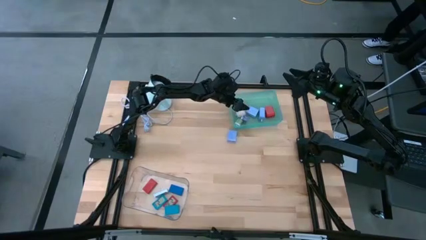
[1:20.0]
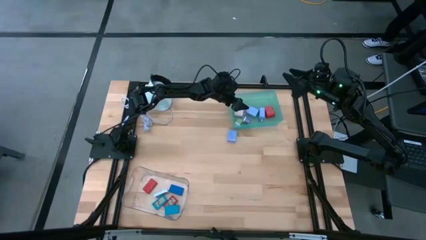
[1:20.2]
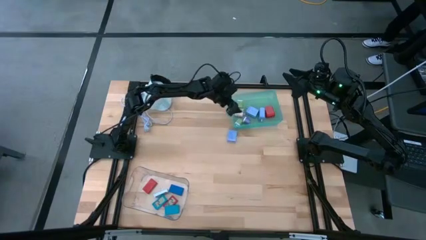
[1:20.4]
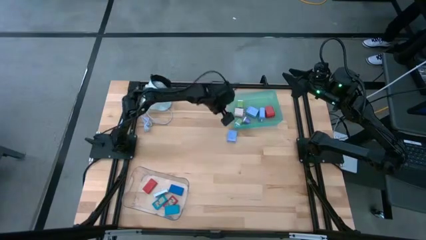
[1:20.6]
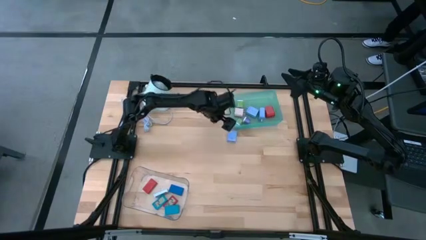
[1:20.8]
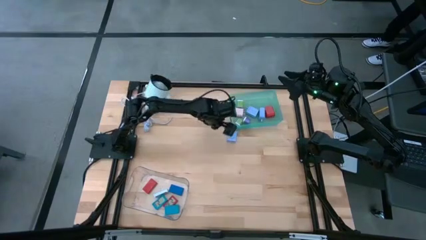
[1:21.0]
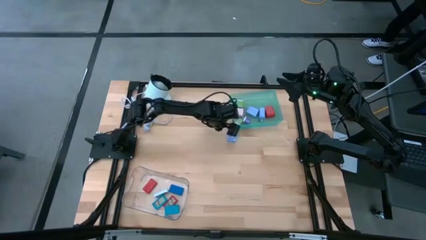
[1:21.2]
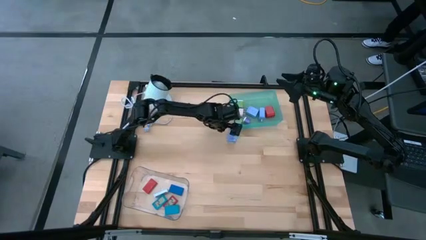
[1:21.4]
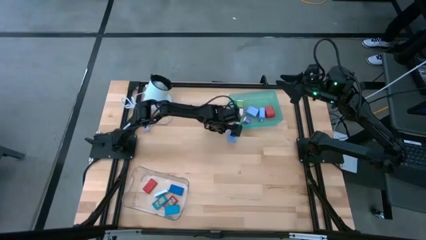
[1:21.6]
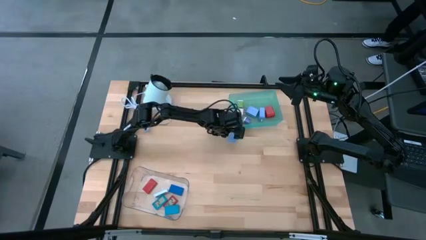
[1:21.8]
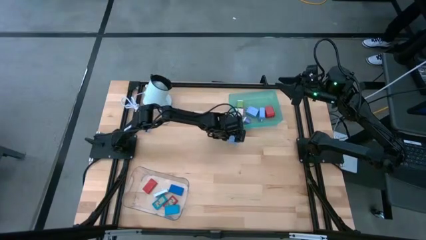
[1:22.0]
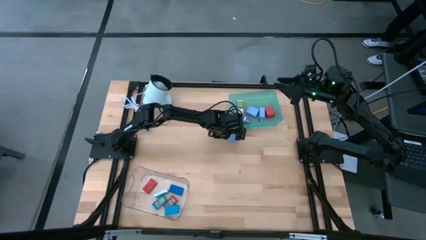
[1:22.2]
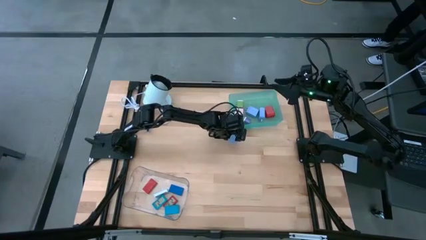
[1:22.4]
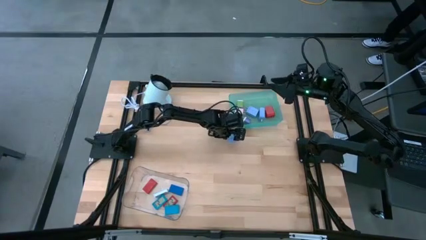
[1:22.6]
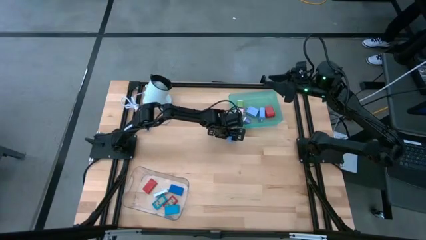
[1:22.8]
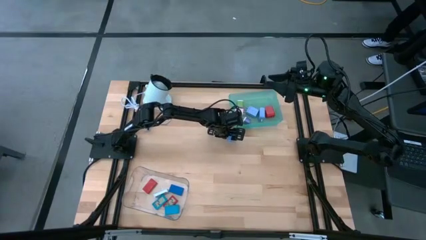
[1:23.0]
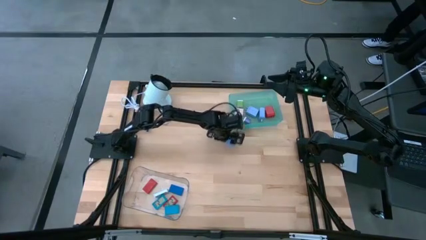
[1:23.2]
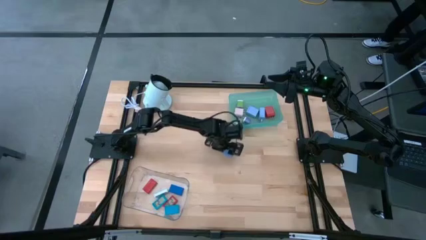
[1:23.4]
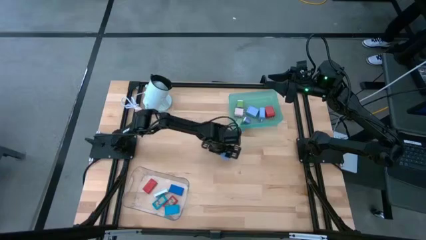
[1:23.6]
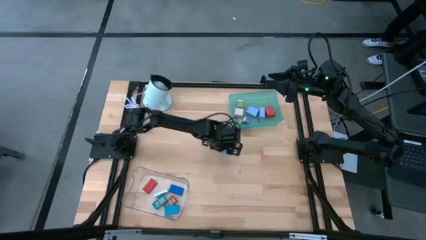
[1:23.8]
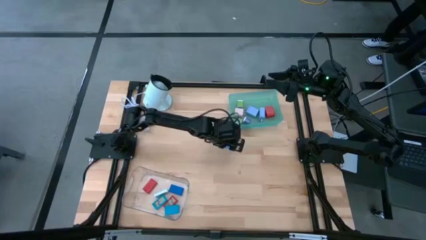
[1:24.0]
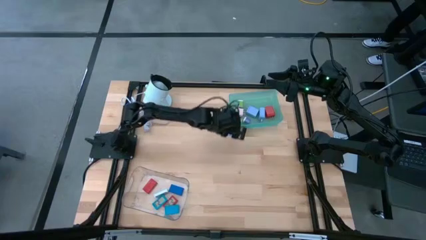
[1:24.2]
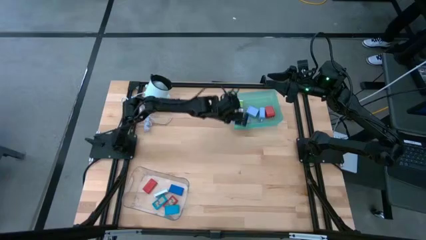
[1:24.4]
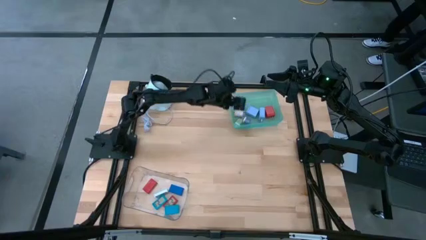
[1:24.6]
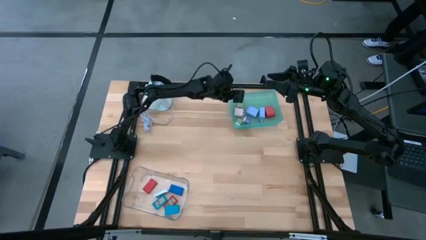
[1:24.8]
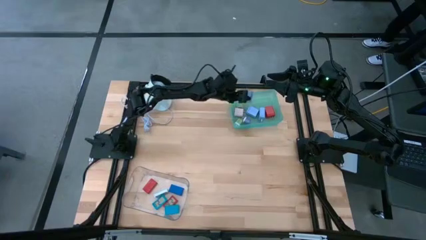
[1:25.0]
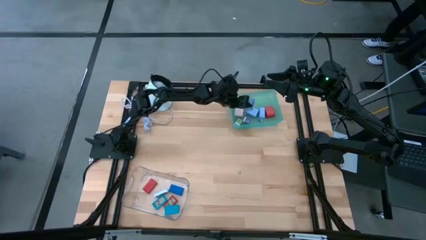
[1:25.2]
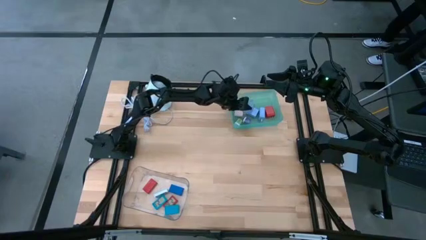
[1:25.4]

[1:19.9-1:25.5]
Task: Pick & Place Office items
Put the light blue charger adapter into the light green bin

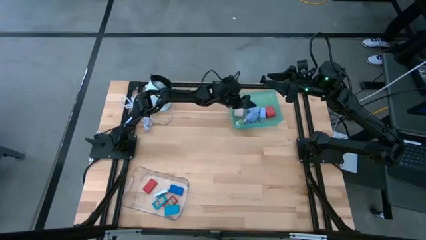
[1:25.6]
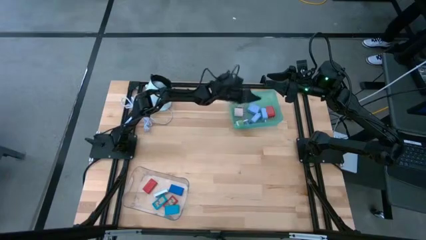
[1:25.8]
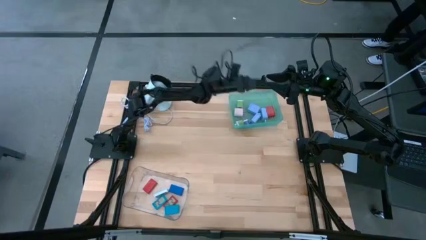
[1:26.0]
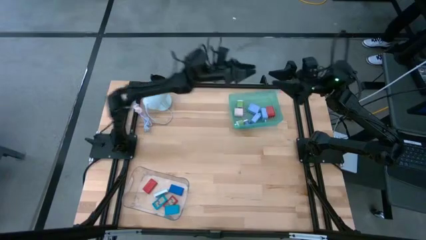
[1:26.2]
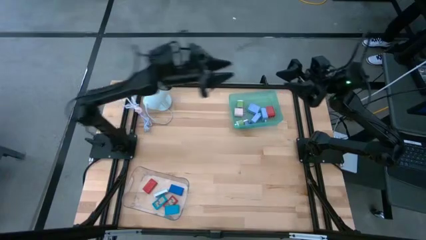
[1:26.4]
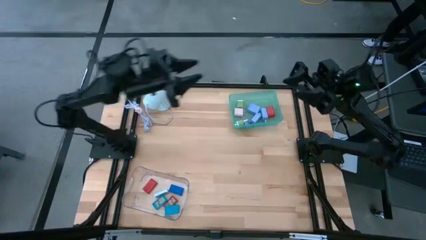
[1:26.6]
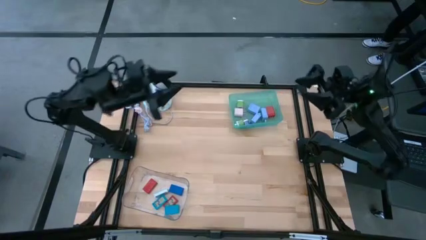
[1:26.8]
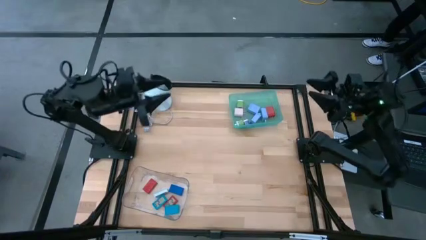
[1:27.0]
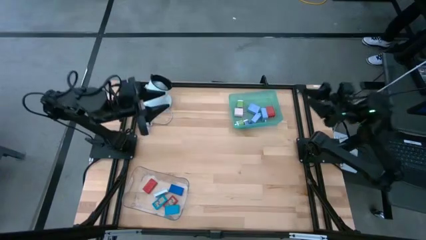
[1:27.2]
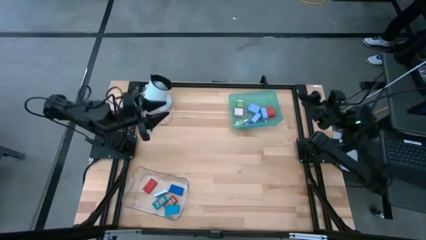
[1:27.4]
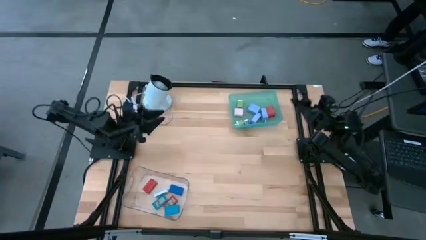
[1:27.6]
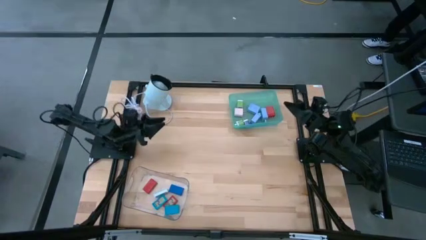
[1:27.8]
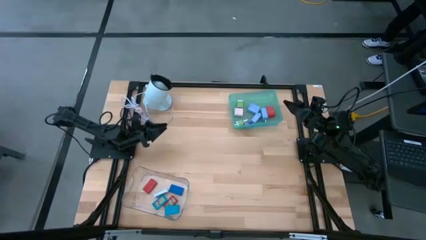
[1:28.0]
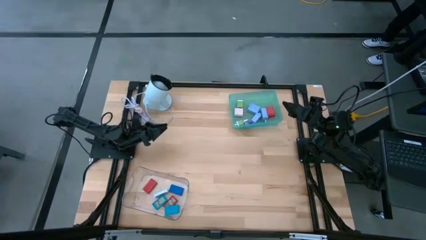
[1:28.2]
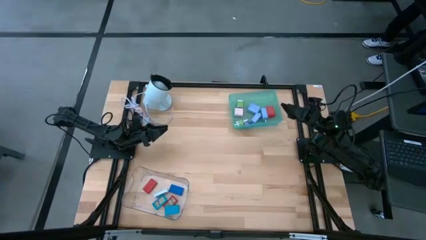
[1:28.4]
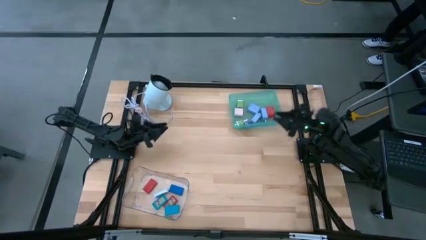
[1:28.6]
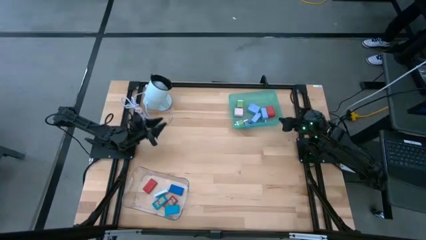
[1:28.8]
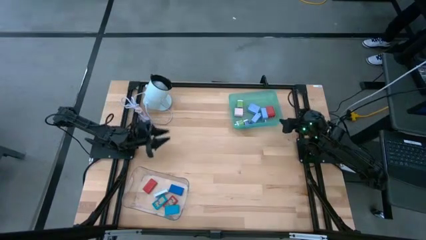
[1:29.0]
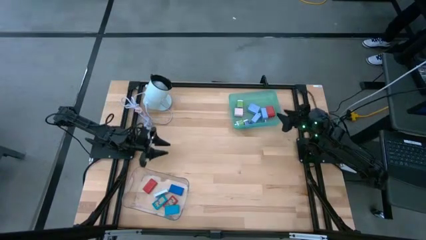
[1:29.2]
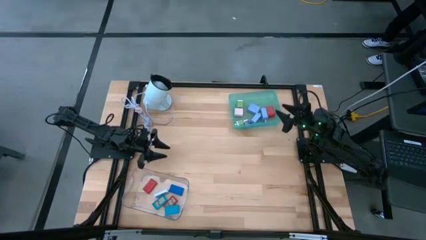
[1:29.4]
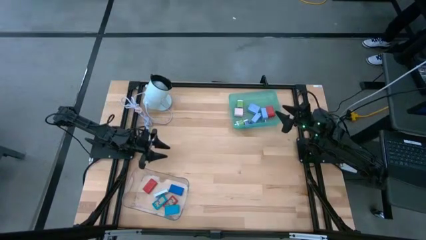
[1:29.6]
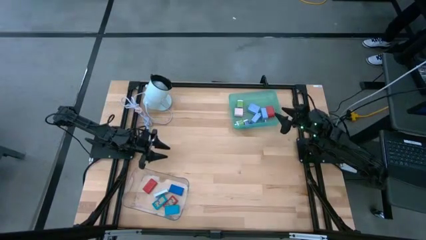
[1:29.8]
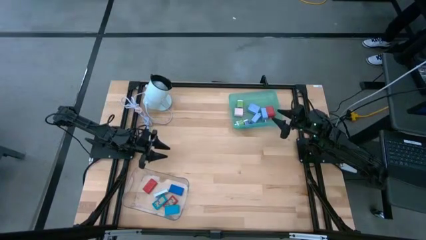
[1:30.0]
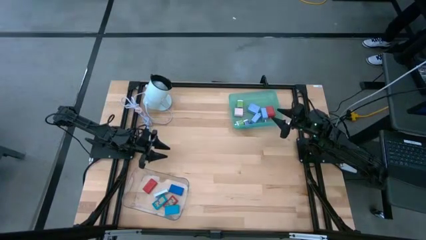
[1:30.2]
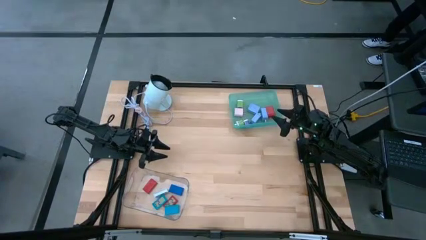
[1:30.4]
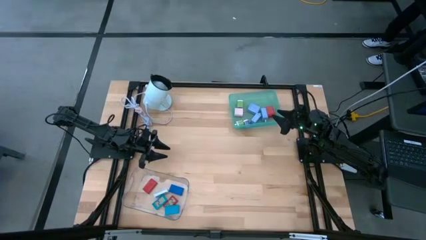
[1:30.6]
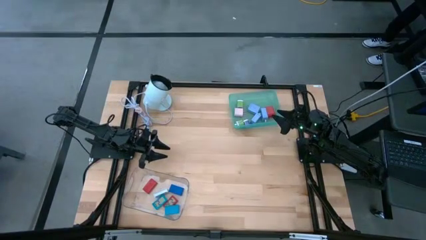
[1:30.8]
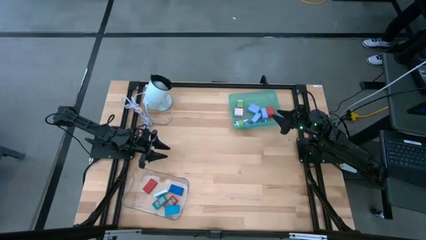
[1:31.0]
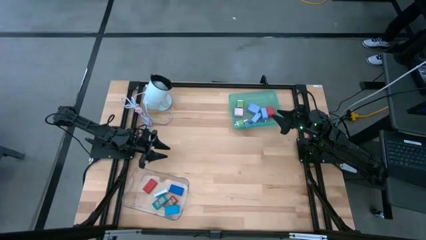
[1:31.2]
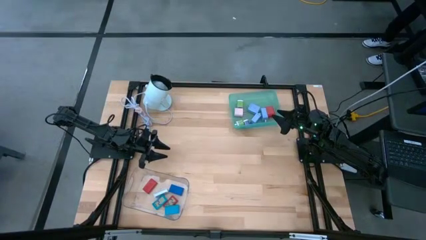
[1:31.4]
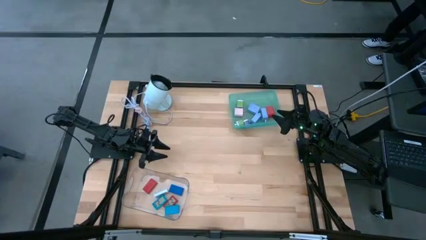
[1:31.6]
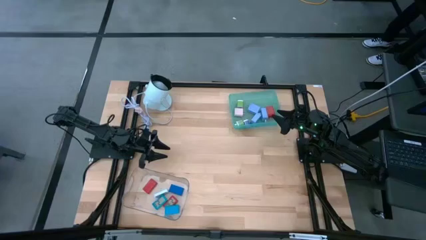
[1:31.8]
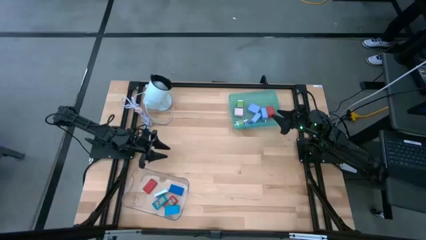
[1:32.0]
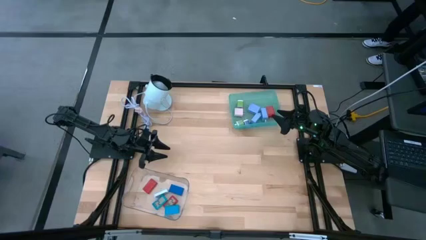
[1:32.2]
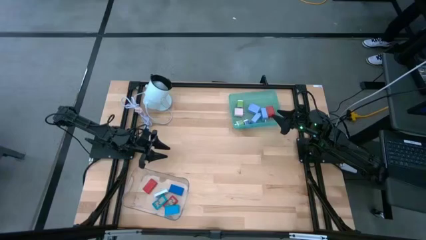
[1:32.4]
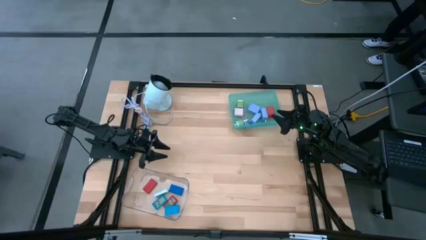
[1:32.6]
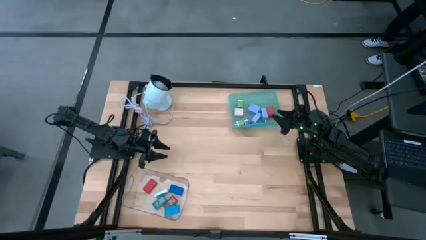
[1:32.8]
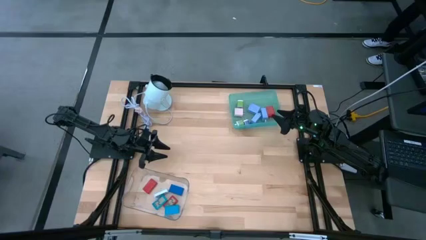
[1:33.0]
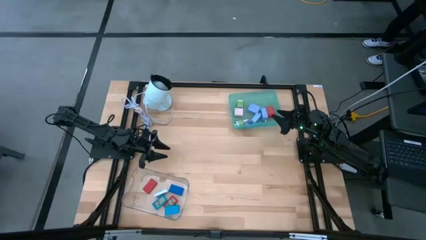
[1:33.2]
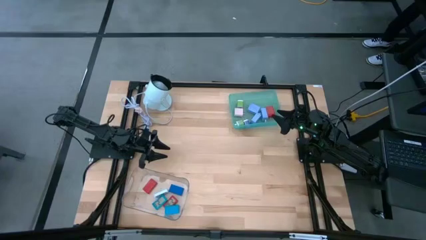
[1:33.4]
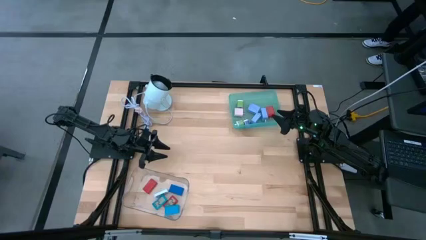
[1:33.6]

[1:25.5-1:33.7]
Return to Home Position

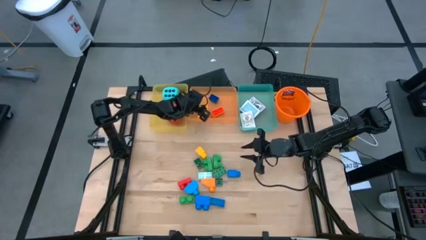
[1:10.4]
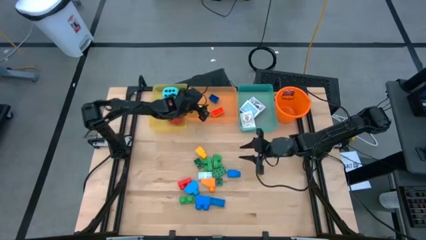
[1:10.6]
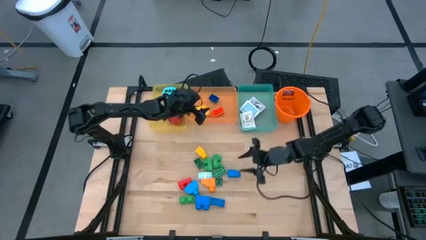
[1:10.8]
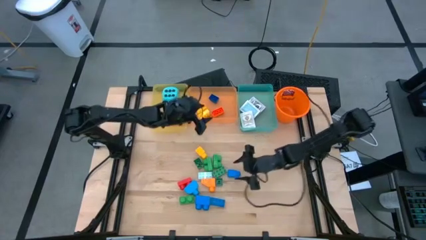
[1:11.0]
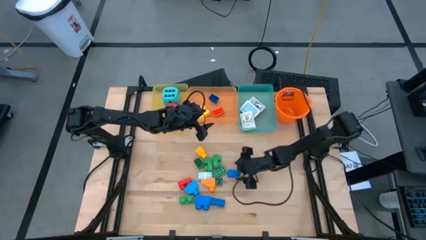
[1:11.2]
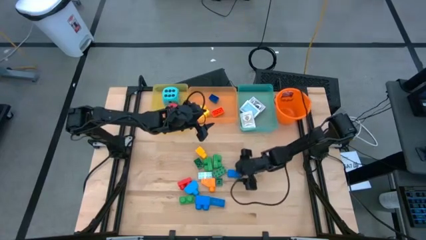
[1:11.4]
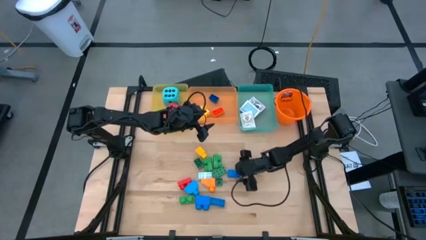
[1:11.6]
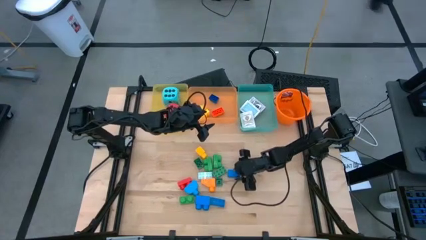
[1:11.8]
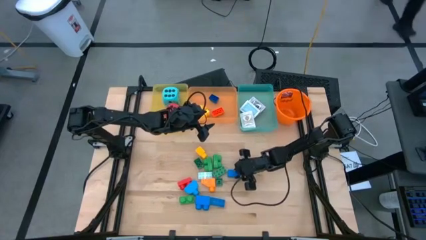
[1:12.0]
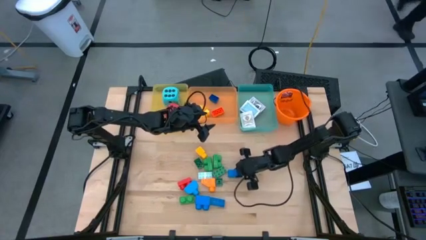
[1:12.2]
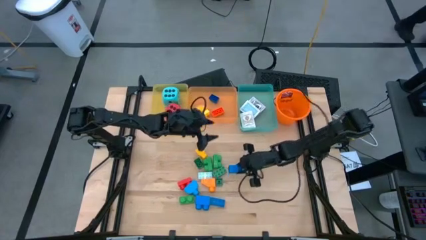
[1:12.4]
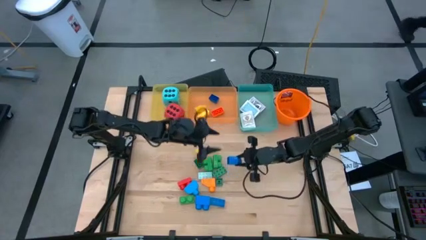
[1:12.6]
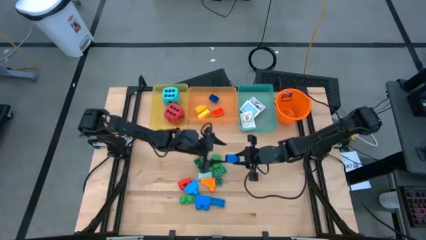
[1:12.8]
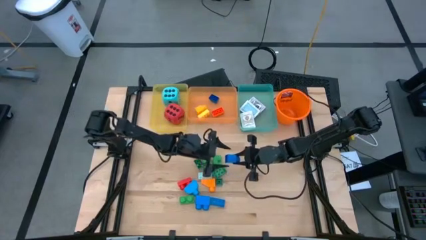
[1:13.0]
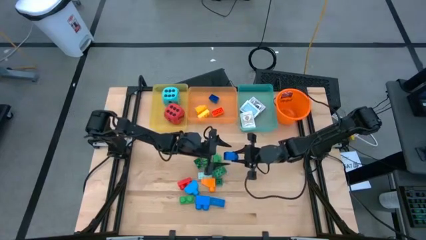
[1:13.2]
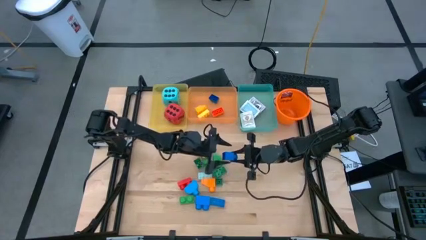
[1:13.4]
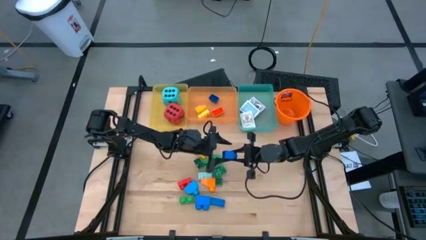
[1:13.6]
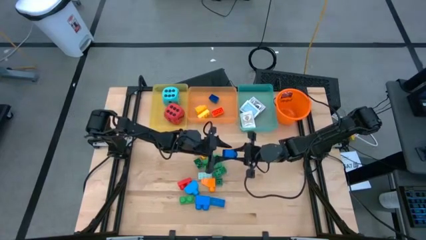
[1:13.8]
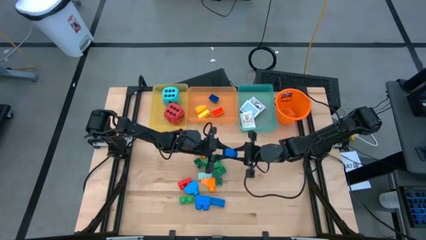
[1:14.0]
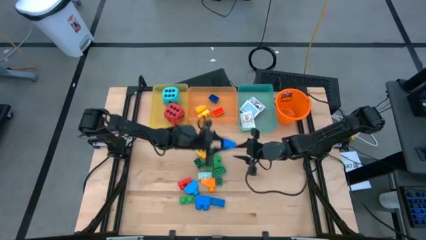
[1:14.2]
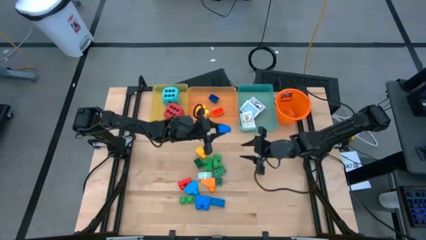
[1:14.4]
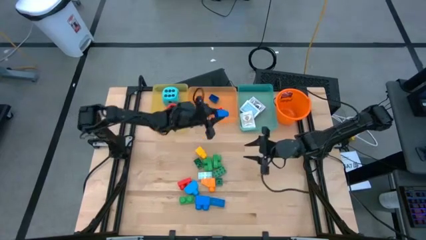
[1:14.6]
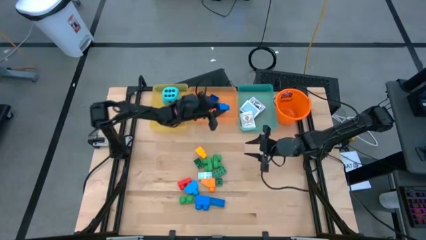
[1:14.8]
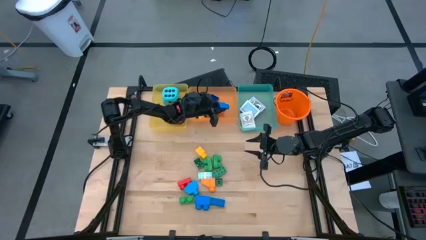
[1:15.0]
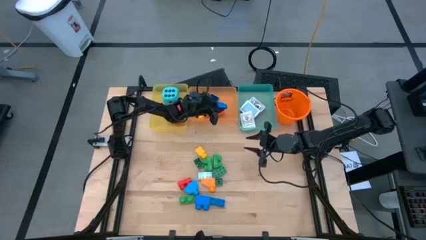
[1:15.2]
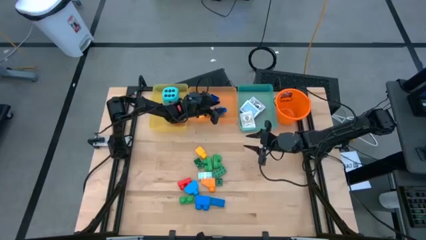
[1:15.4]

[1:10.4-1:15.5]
Task: Pick & Place Toys
Put the blue game piece into the orange bin
